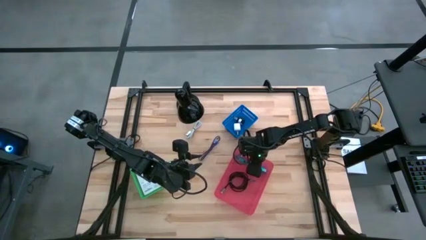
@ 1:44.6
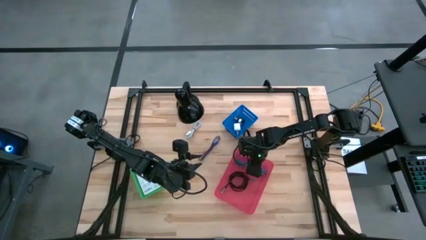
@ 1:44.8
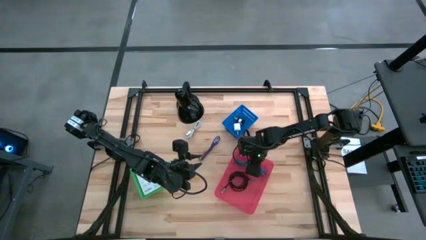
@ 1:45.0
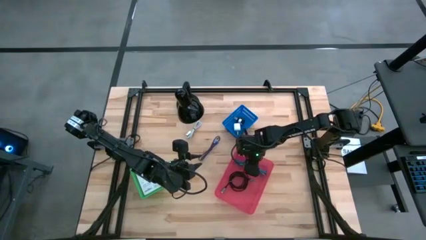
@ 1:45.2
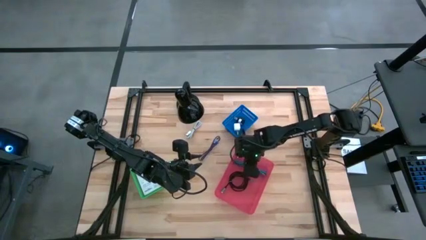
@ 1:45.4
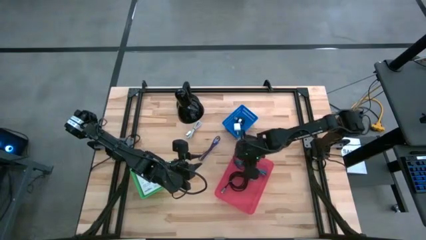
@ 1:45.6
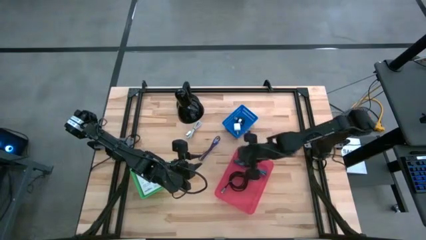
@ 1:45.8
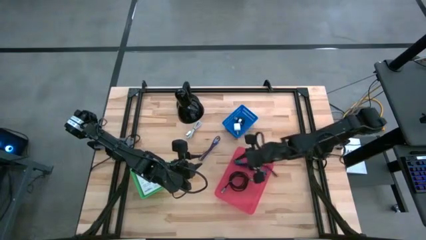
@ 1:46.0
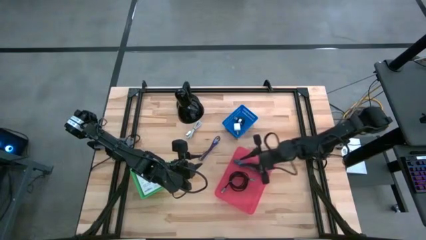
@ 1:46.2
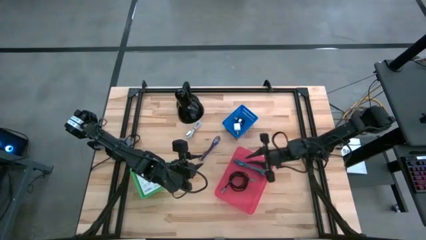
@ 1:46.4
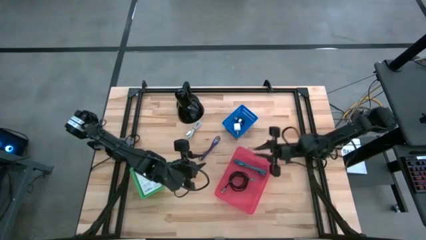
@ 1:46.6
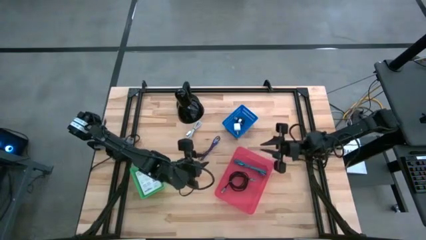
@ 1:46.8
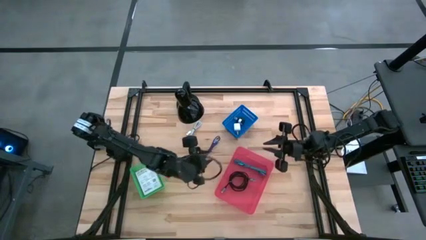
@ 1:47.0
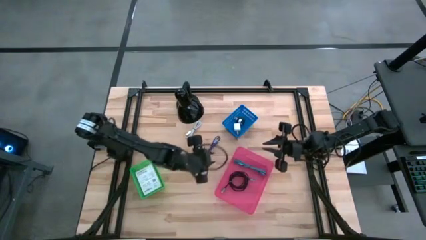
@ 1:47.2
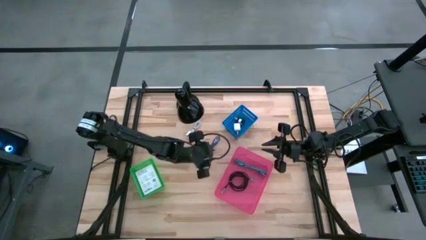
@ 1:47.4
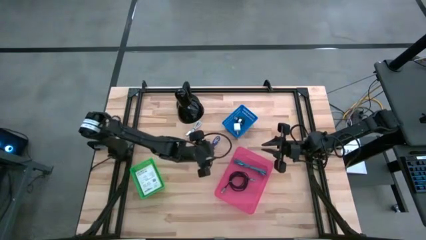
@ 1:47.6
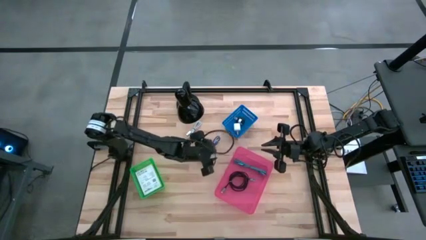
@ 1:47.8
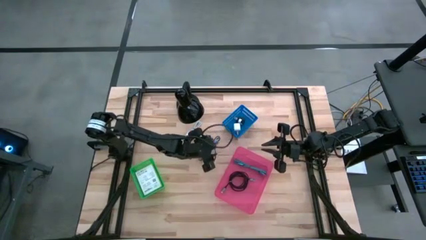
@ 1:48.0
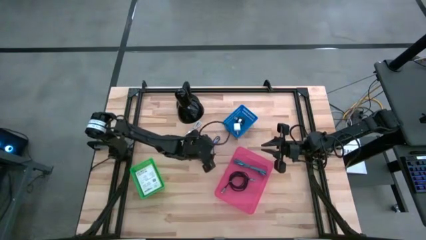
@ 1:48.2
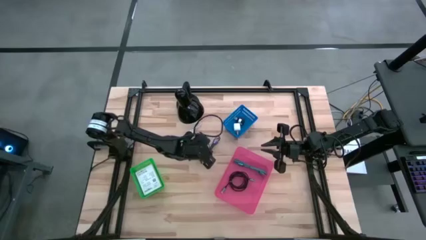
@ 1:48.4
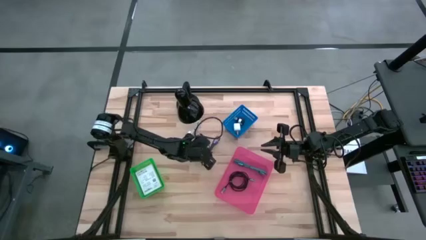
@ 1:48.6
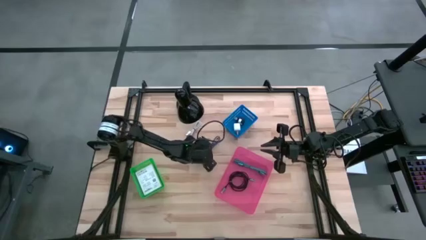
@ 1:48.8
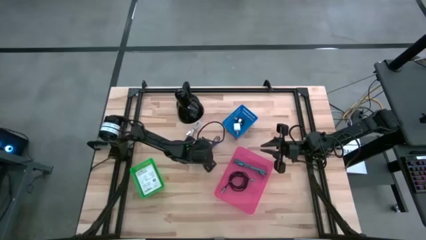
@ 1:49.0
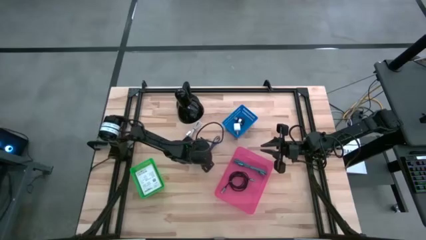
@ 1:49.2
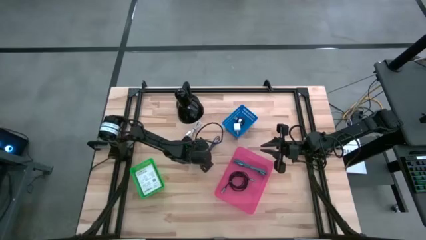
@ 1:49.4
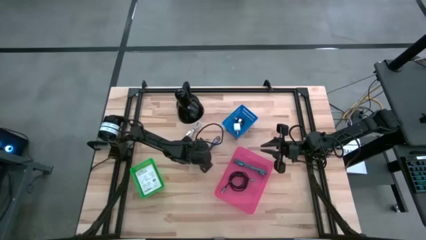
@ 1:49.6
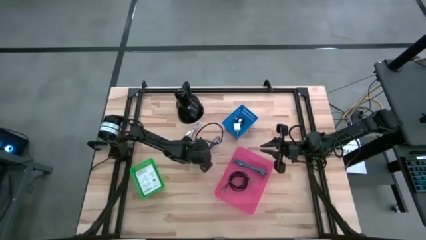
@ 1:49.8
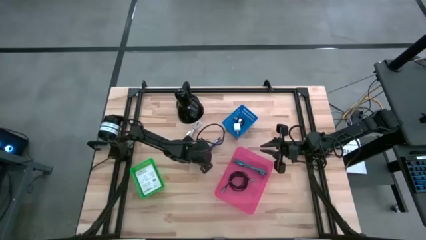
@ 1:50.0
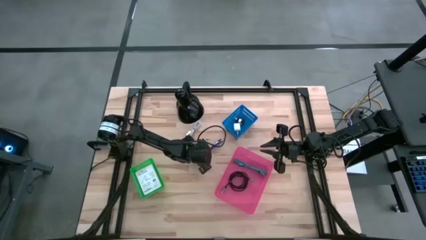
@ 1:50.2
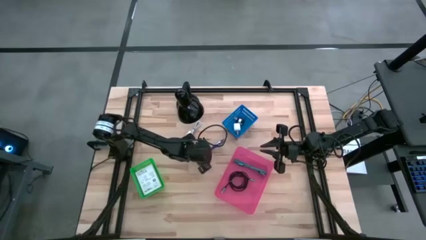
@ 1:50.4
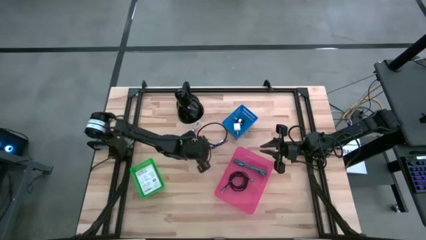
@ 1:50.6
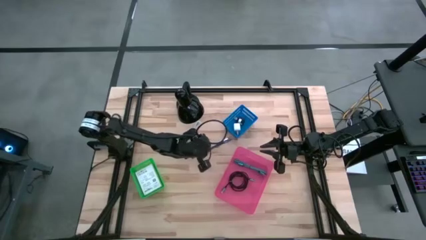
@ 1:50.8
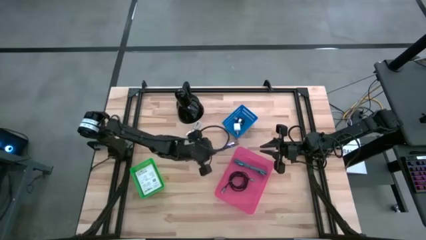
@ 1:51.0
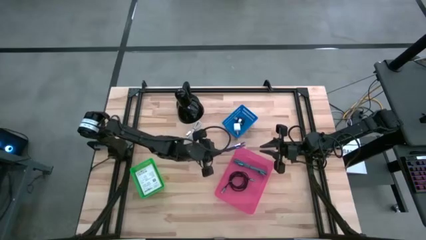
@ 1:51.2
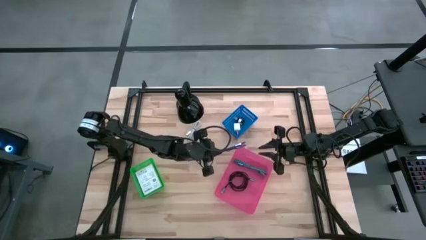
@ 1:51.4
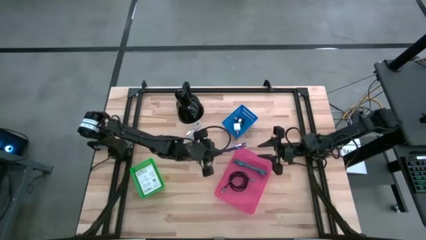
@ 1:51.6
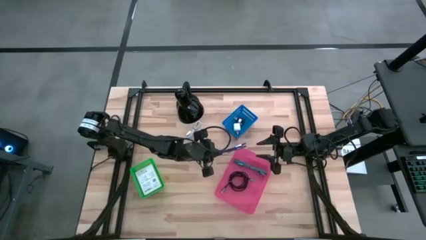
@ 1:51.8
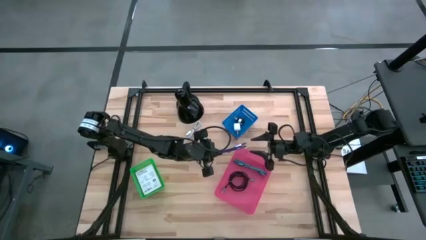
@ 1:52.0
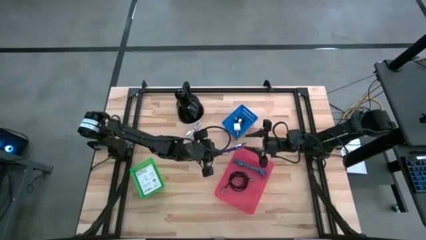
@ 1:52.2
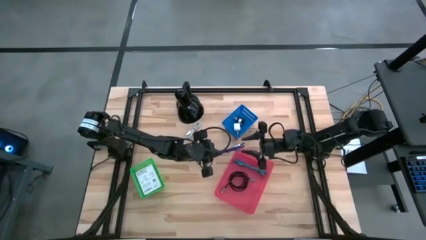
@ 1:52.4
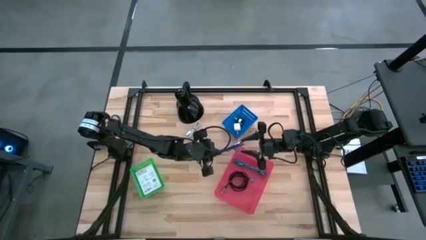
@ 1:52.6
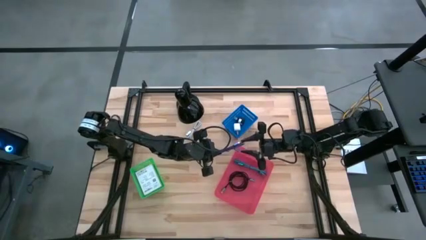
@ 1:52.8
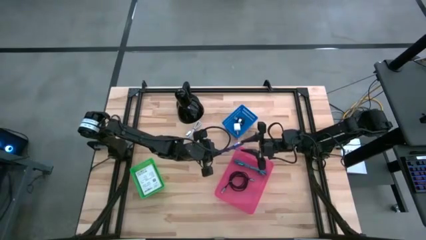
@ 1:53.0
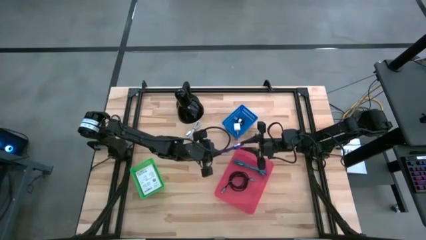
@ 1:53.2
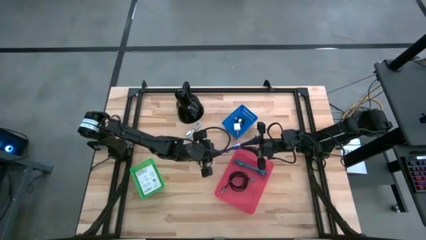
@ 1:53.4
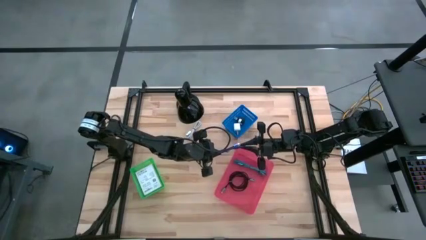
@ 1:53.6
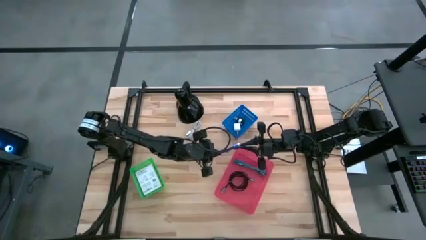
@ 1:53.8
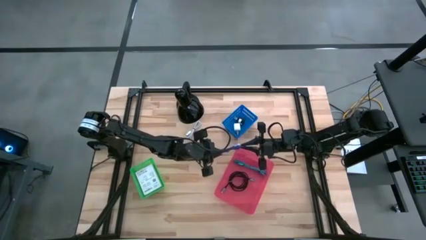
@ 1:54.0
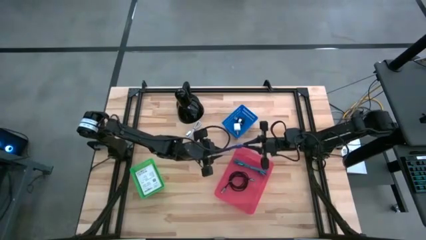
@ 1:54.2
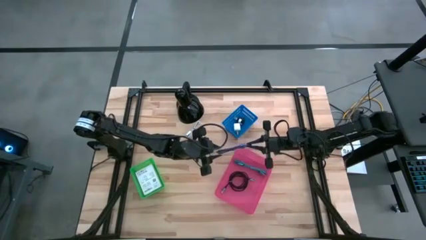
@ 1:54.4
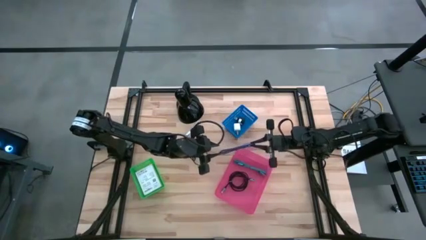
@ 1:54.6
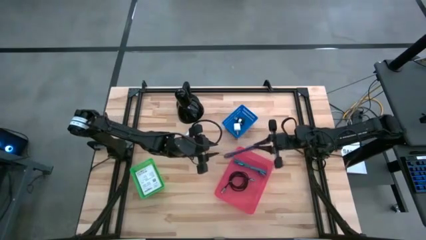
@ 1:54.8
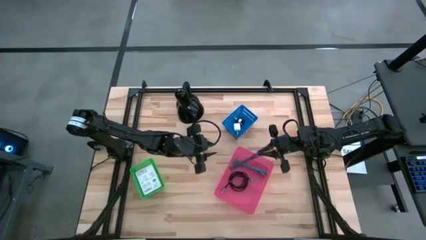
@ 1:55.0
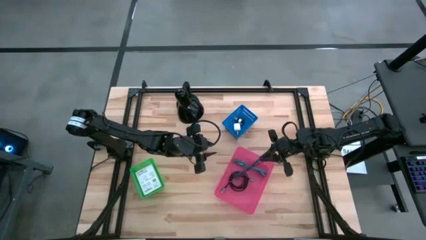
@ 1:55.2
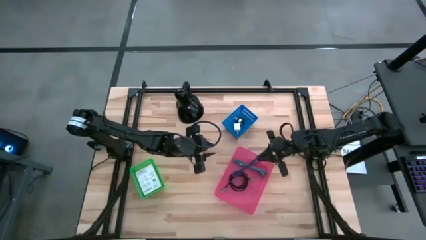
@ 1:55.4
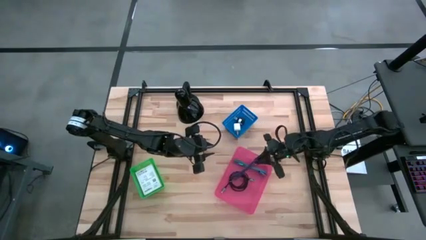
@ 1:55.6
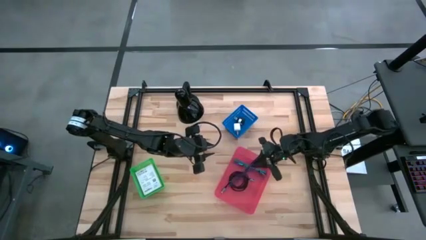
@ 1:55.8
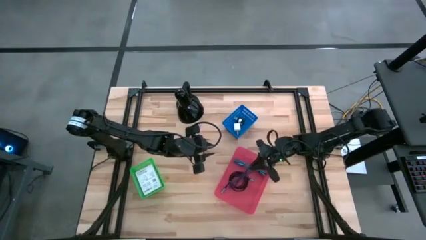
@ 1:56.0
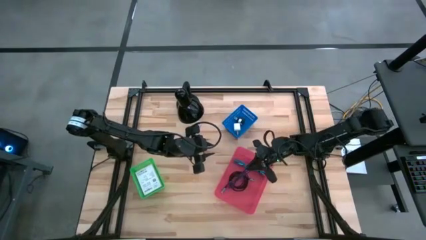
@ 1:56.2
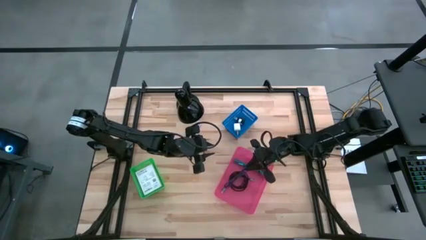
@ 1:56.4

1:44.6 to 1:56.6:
Task: Pick and place items into bin
Put the purple charger cable into the pink bin
